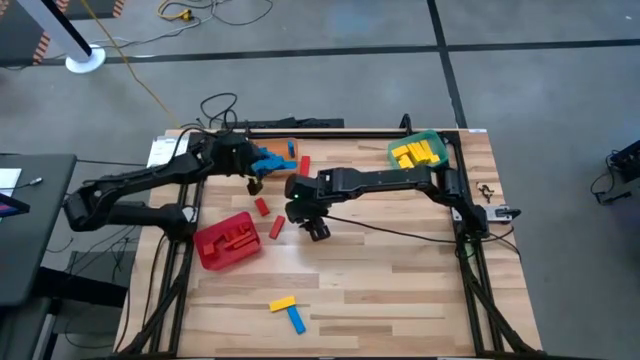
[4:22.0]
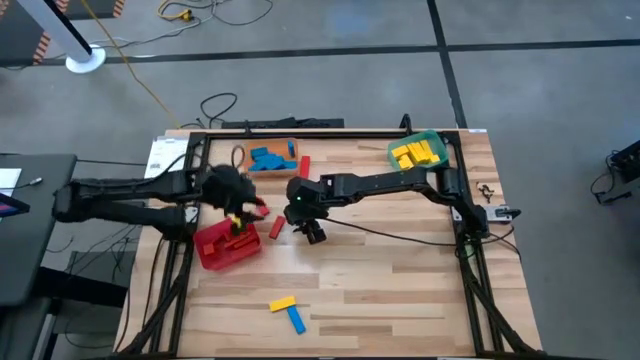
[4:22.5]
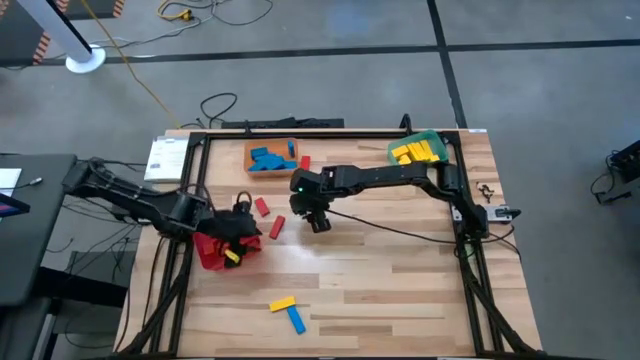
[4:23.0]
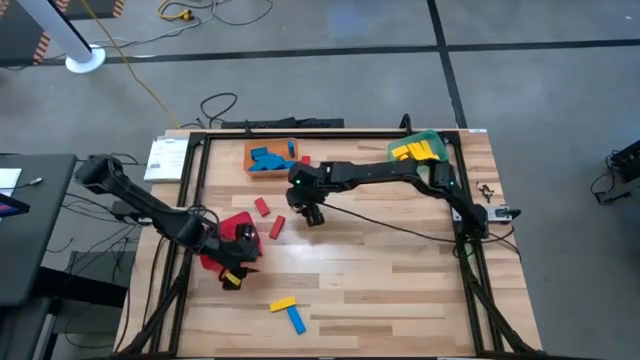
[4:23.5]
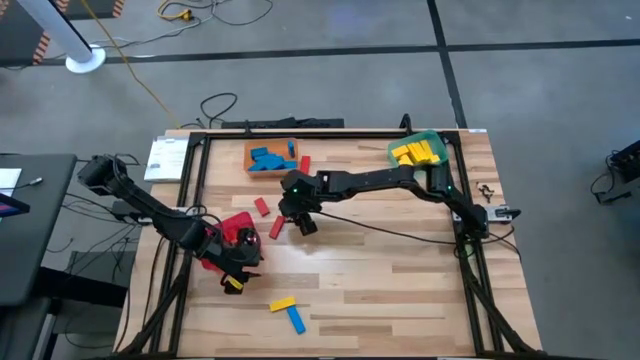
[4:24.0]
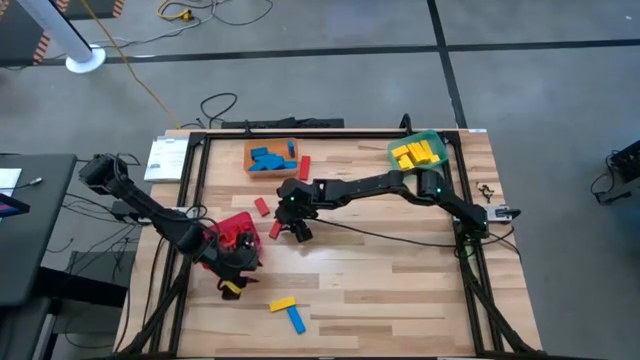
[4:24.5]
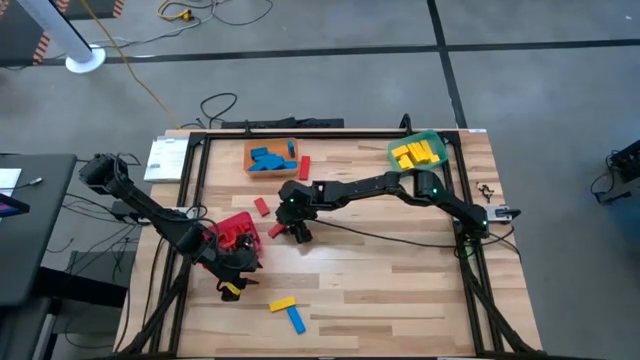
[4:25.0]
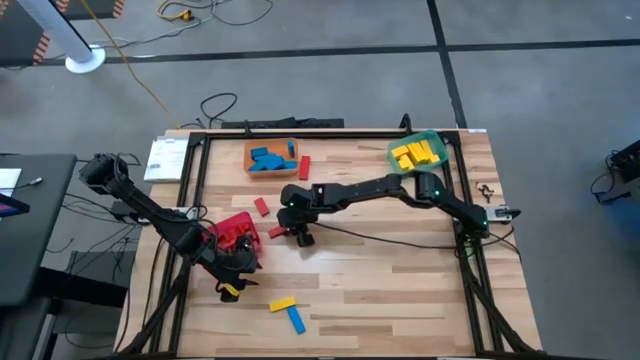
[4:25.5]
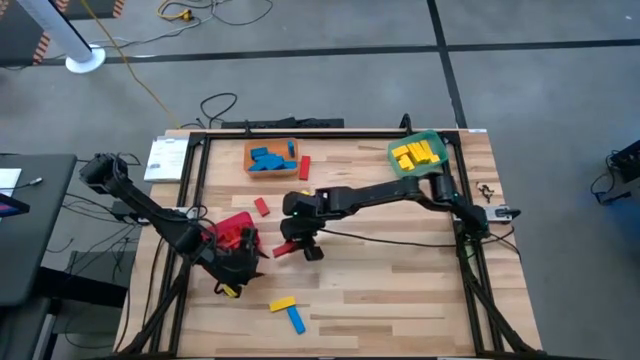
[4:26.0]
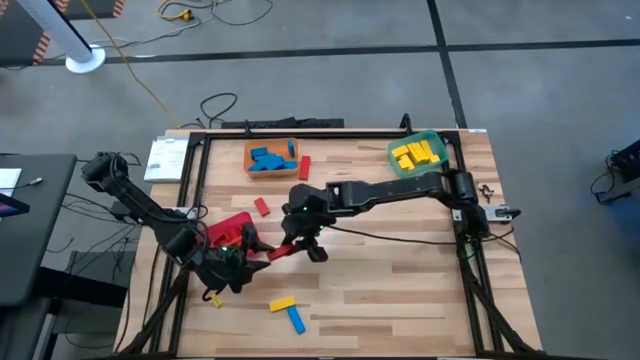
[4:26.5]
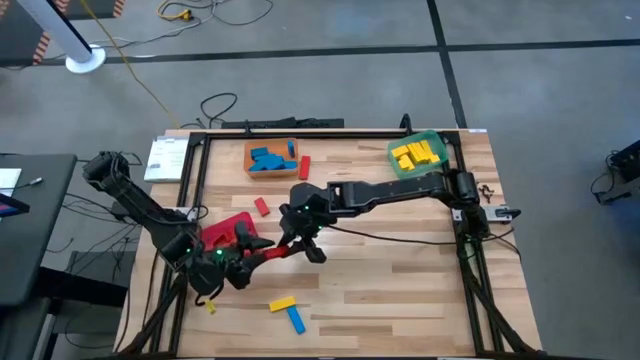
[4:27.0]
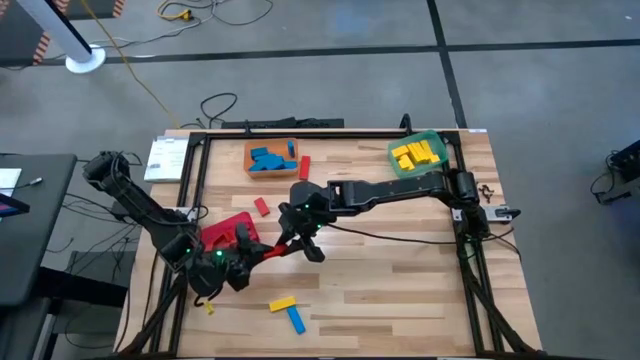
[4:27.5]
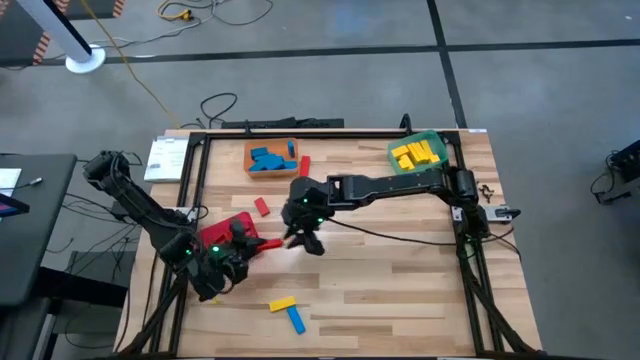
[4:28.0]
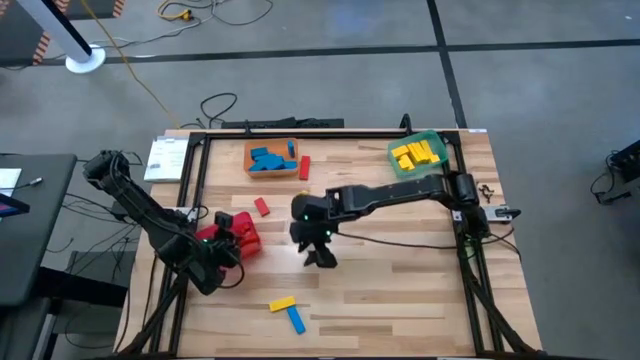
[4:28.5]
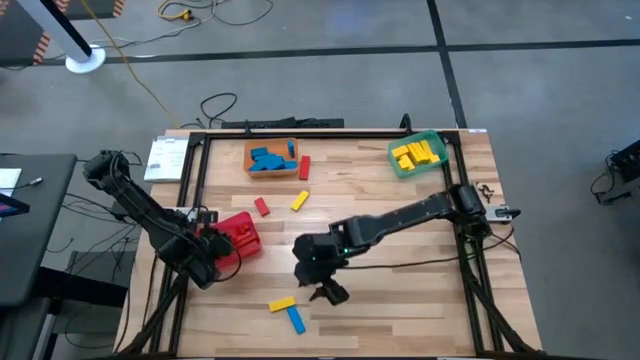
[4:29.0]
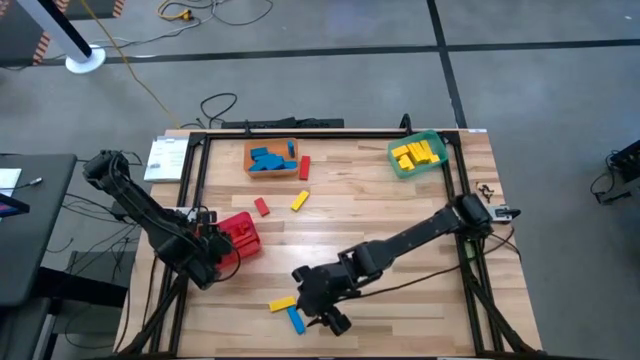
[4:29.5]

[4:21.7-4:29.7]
Task: Sort blocks
Put the red block into the red bin

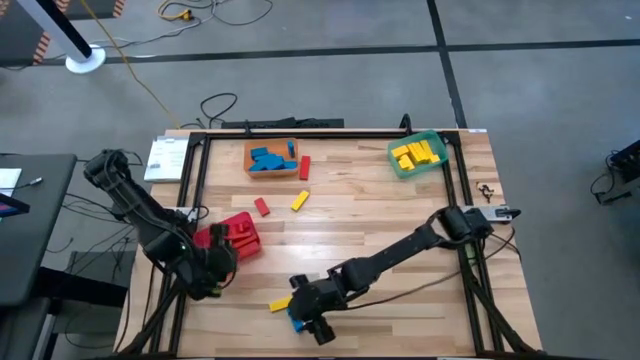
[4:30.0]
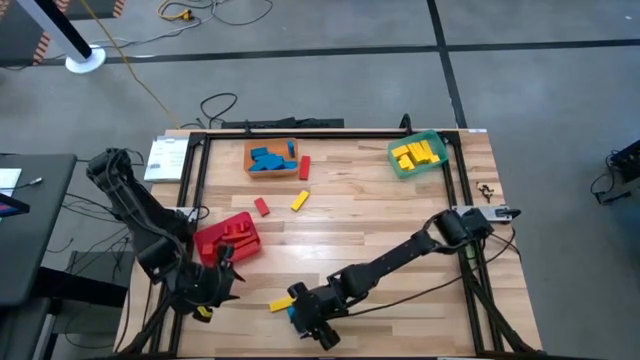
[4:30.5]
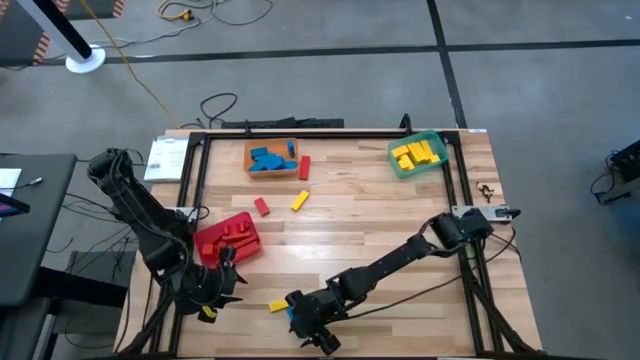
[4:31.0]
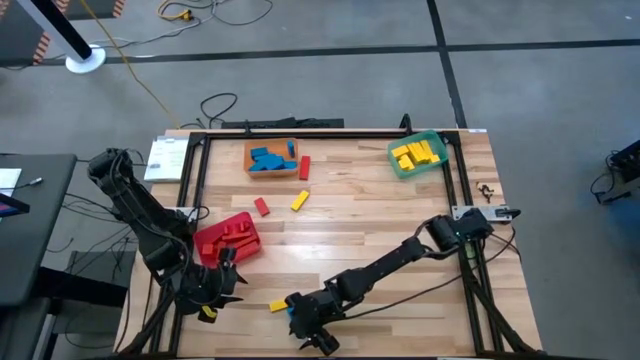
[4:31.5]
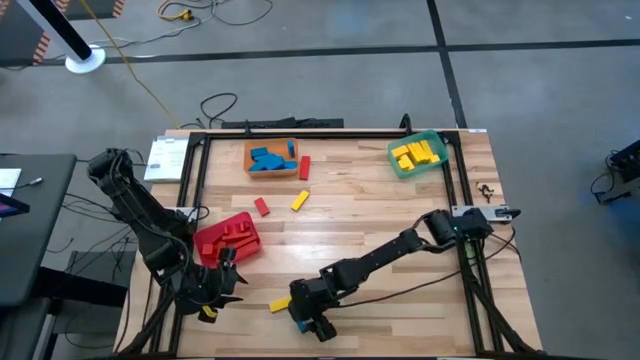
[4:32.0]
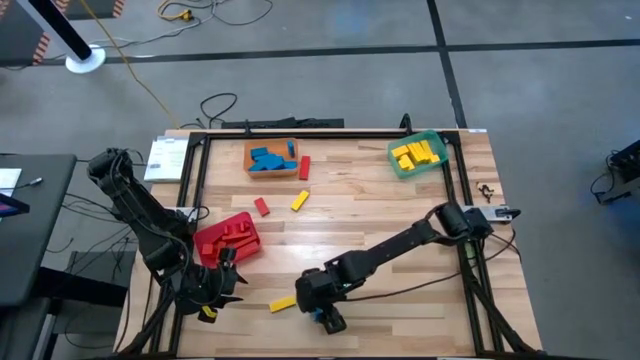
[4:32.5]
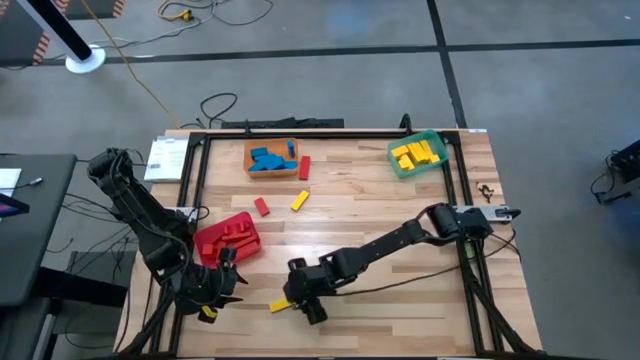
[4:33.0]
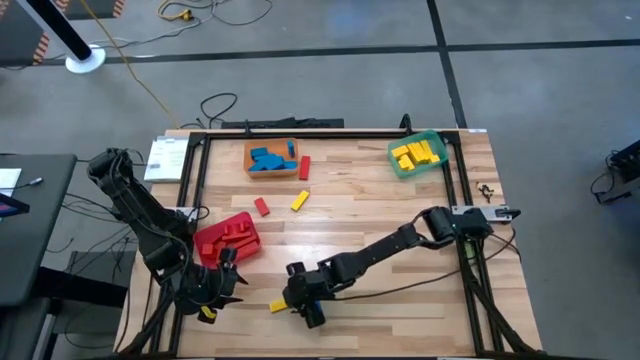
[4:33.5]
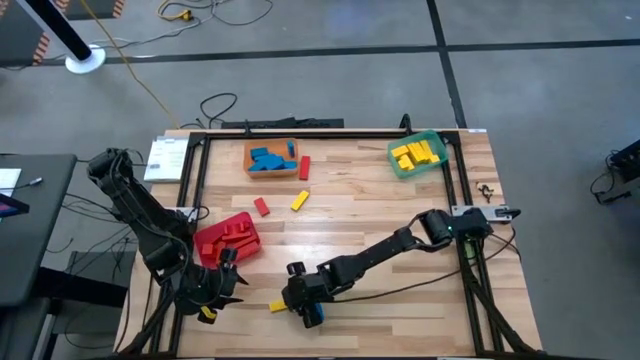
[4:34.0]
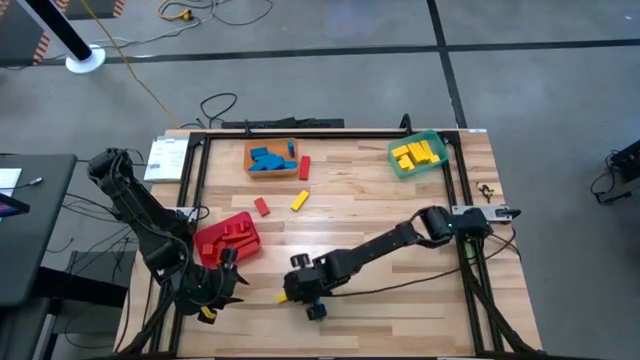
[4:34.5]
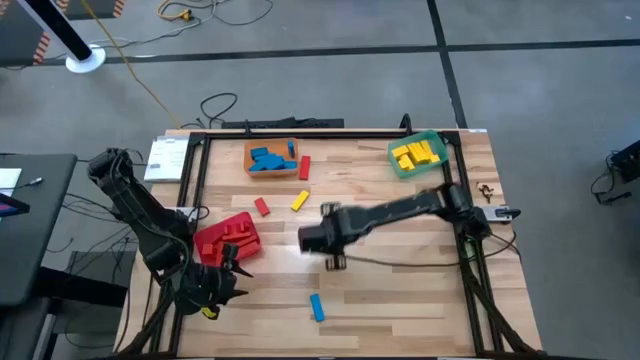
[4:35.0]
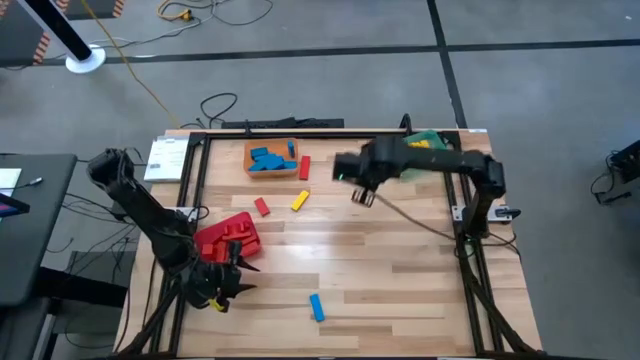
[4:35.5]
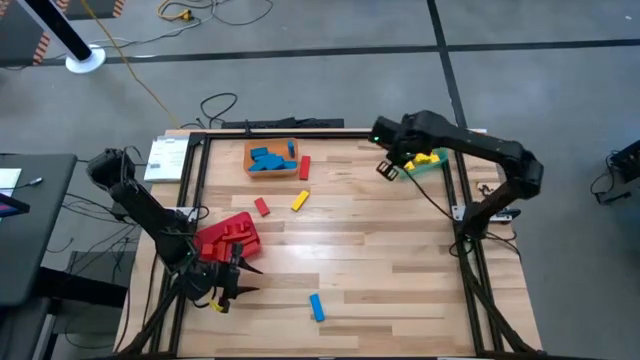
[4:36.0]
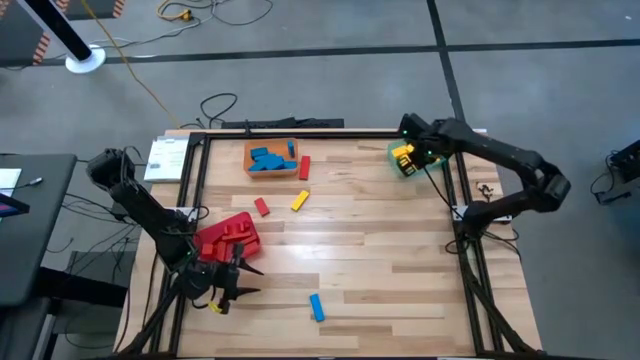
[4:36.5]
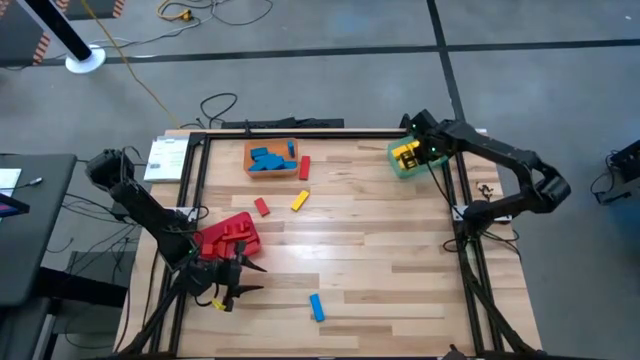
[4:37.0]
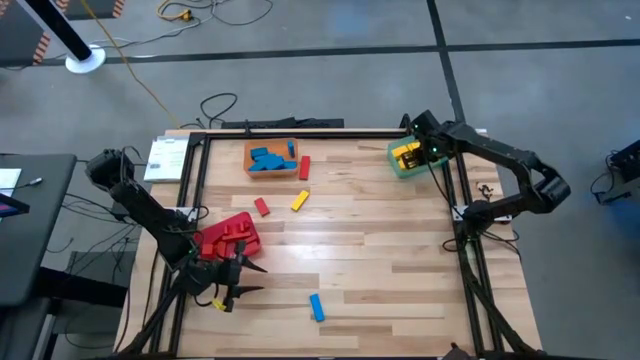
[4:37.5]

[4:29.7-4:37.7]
Put the yellow block into the green bin

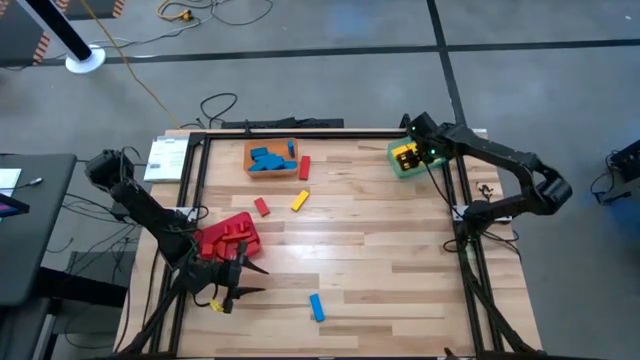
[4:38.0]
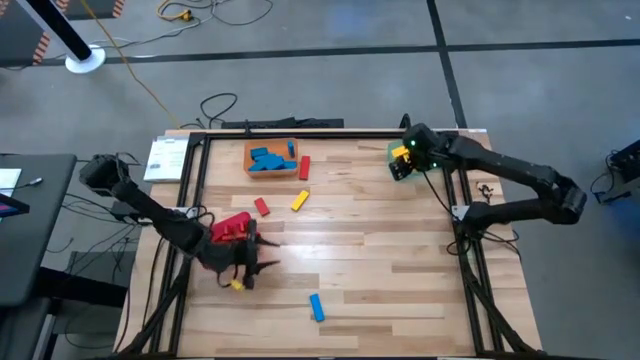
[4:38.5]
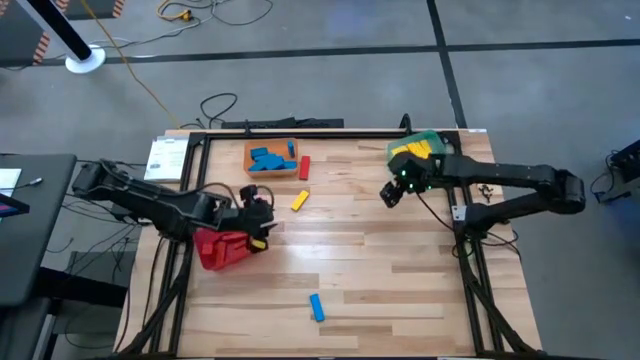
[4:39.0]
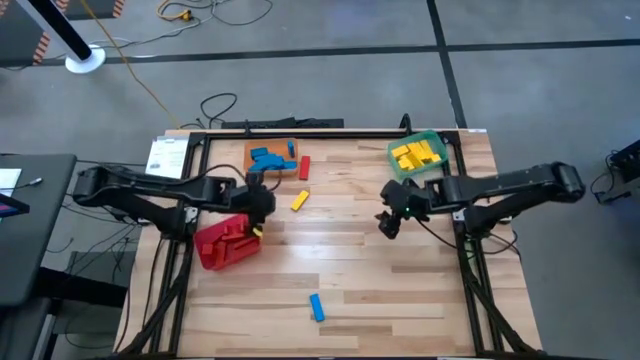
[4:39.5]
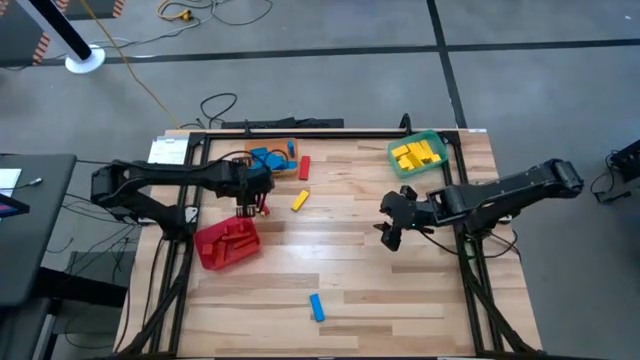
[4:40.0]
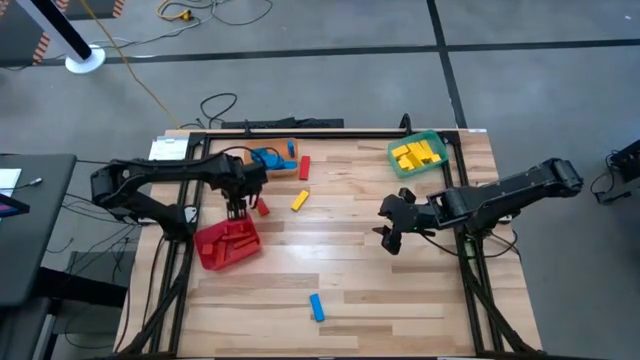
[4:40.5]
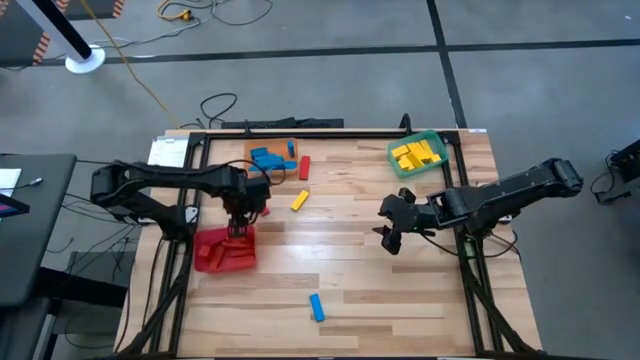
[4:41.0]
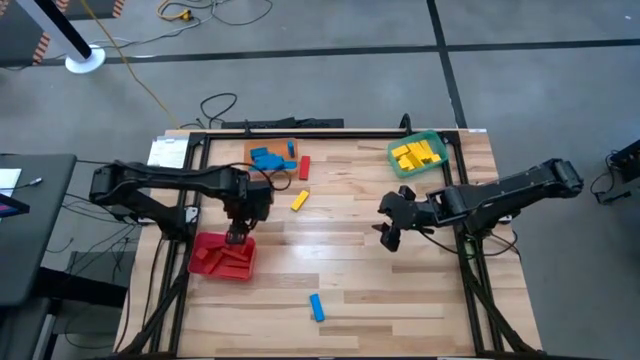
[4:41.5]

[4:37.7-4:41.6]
Adjust the red bin

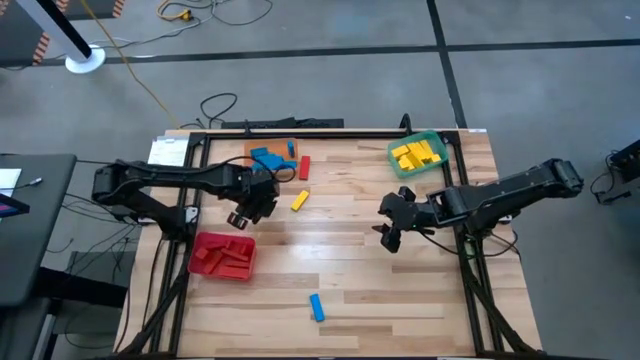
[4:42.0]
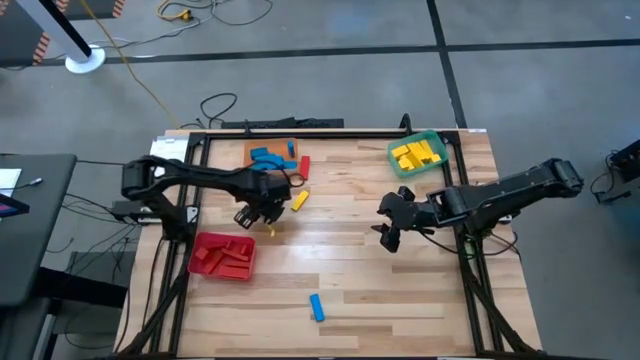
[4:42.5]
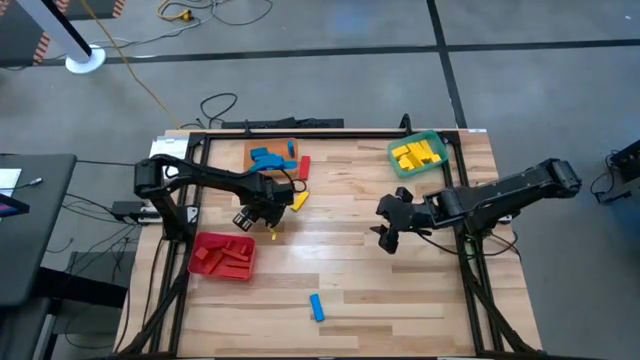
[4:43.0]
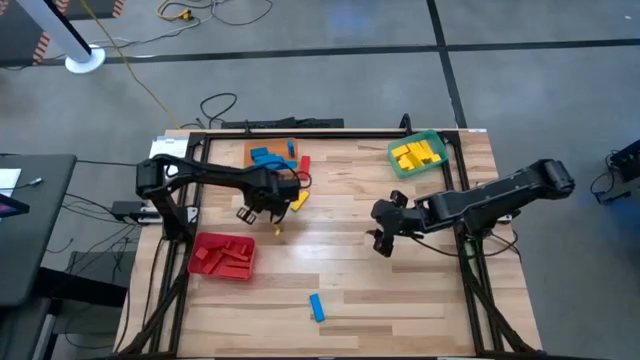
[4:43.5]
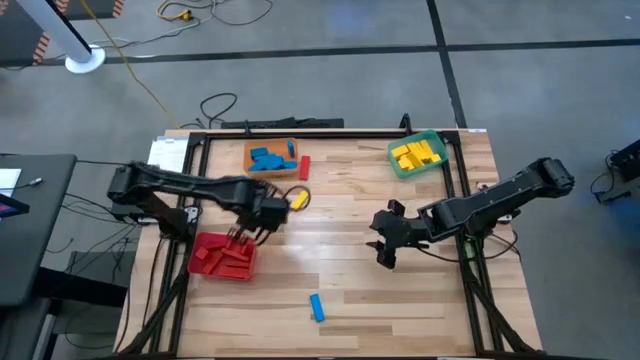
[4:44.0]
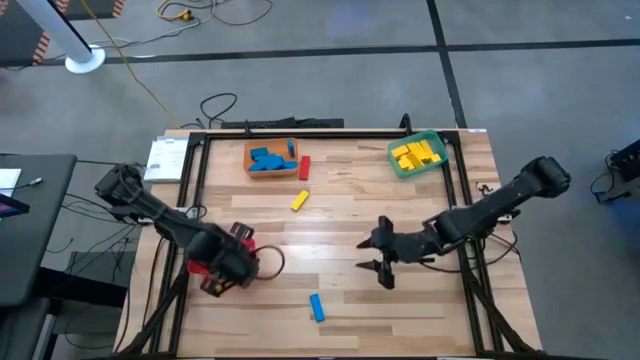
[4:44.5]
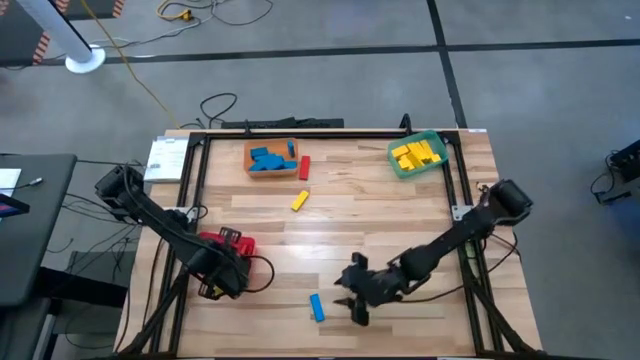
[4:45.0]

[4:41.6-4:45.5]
Put the red block into the orange bin
